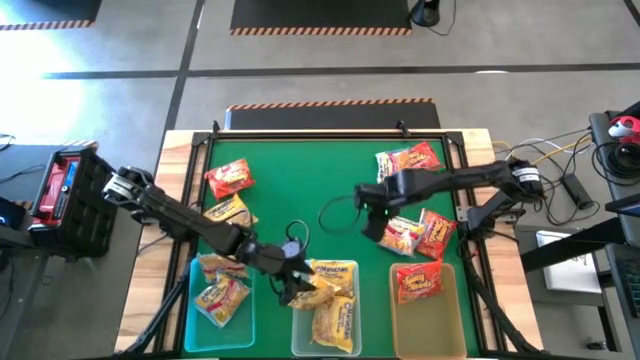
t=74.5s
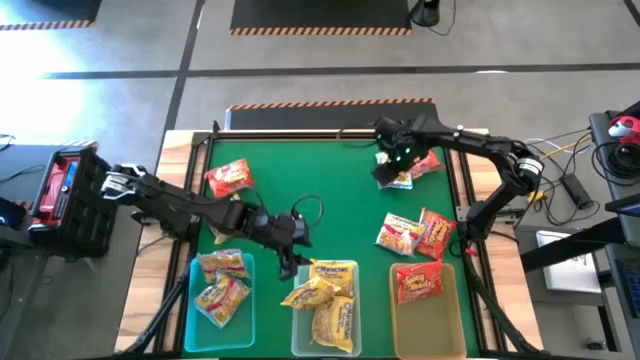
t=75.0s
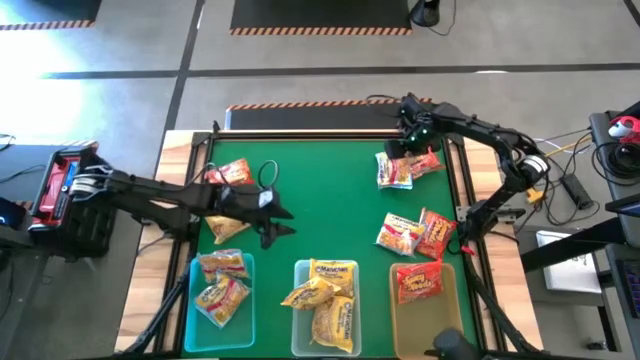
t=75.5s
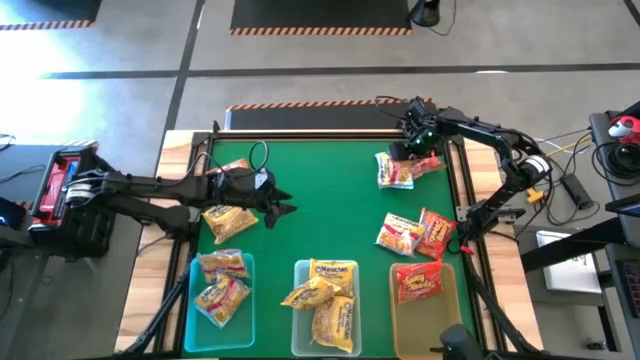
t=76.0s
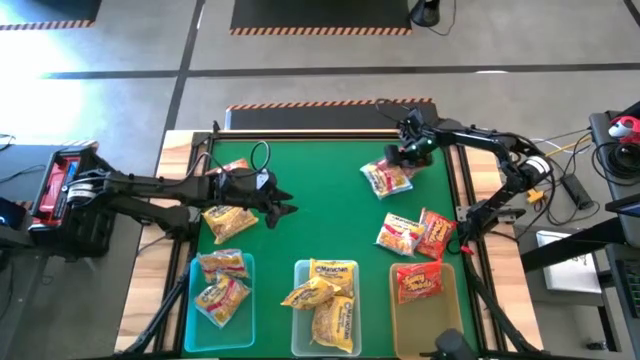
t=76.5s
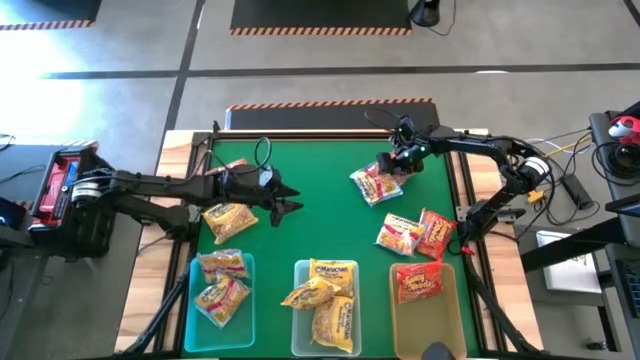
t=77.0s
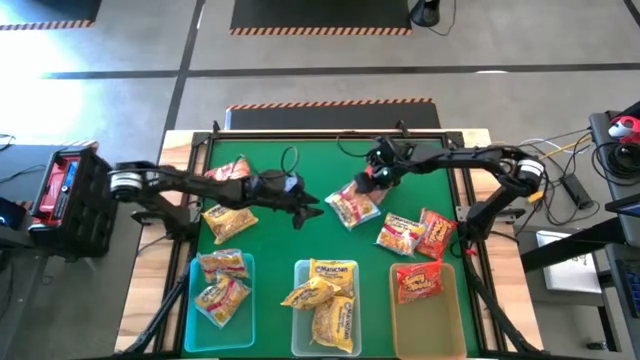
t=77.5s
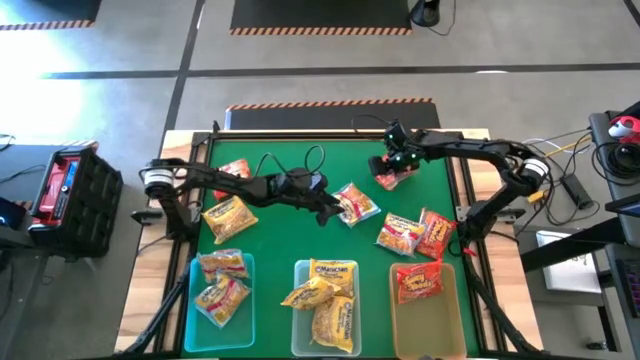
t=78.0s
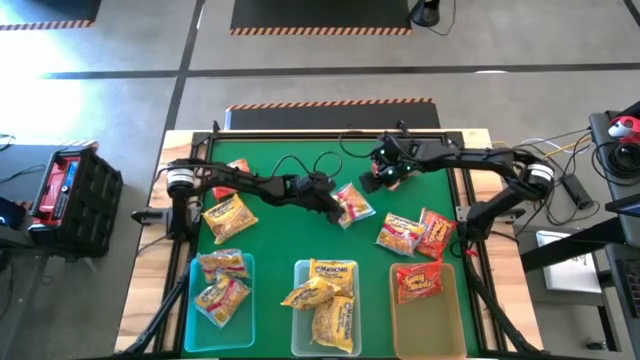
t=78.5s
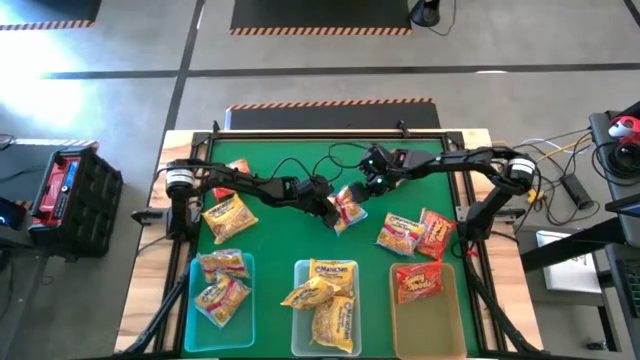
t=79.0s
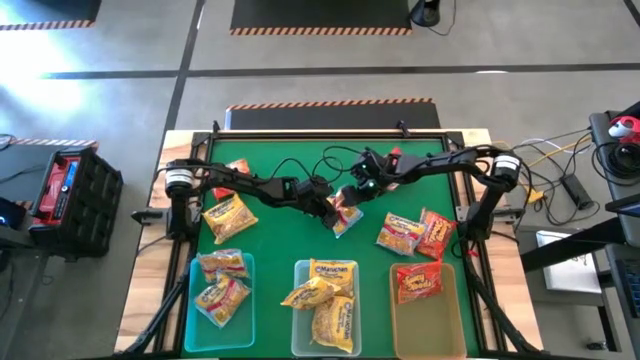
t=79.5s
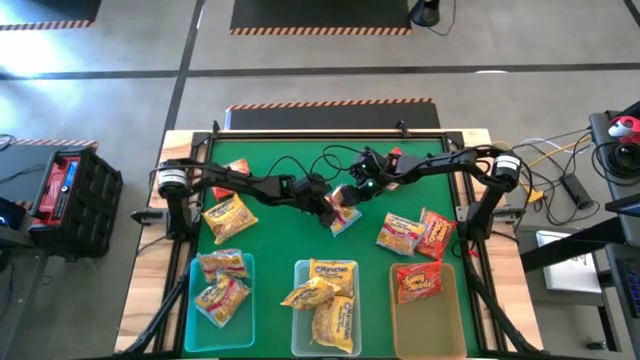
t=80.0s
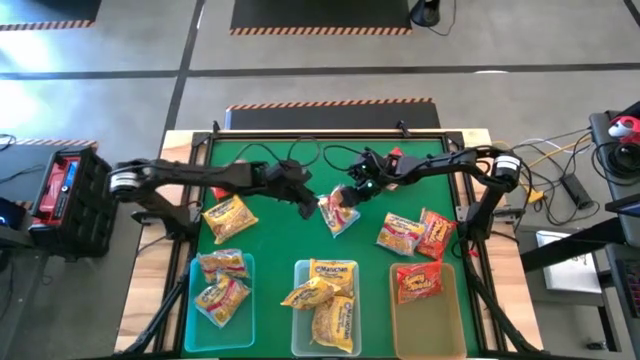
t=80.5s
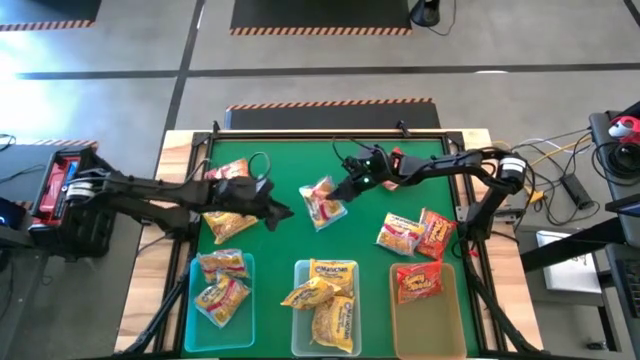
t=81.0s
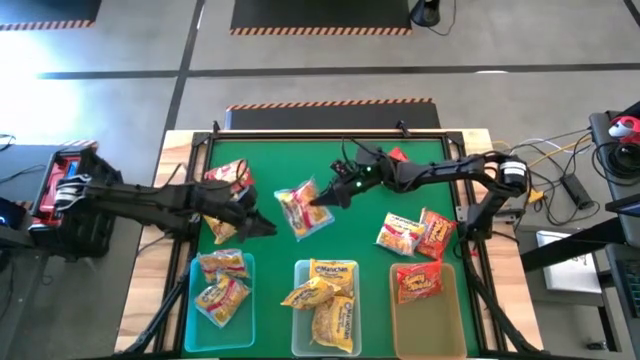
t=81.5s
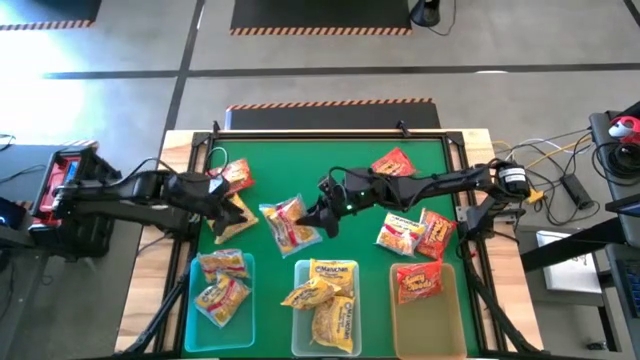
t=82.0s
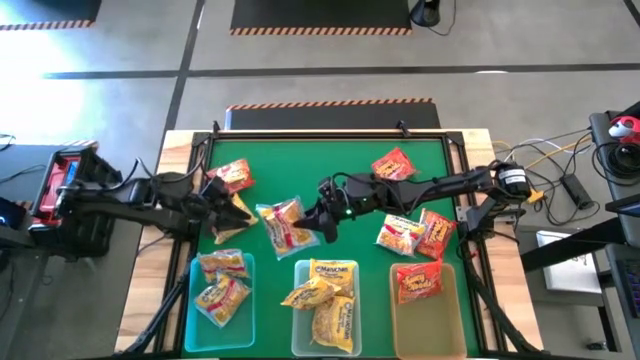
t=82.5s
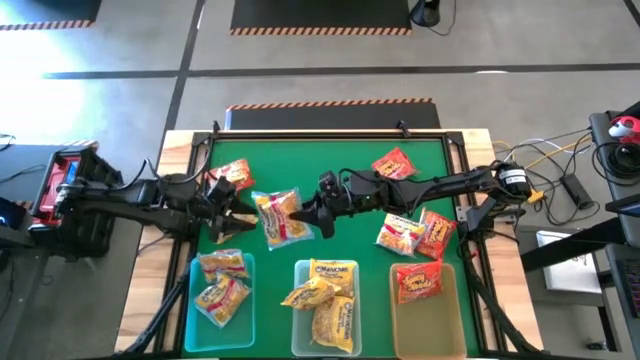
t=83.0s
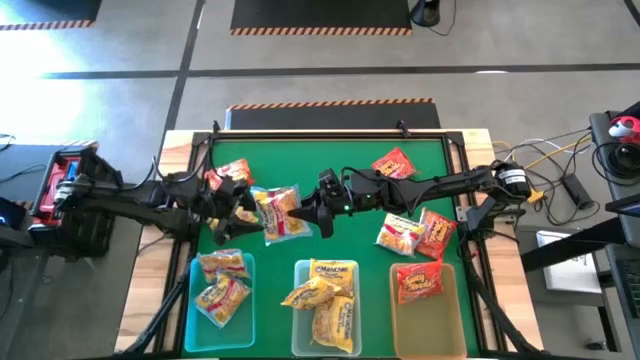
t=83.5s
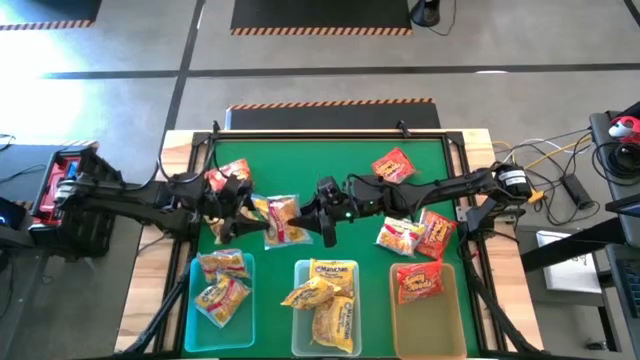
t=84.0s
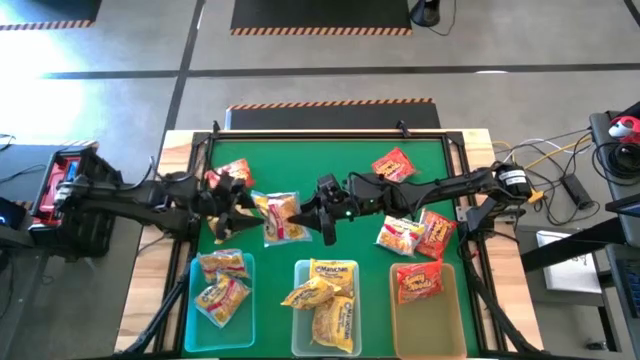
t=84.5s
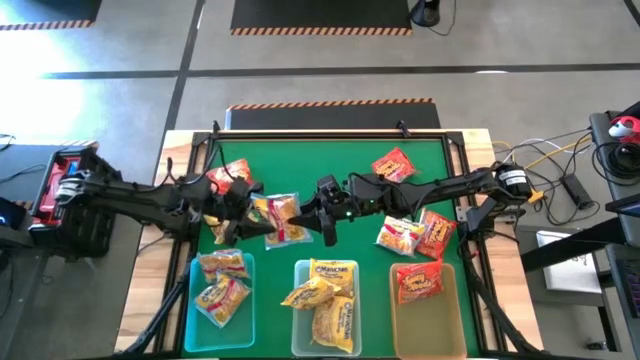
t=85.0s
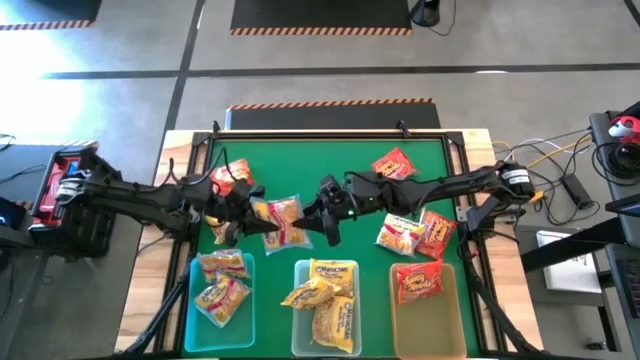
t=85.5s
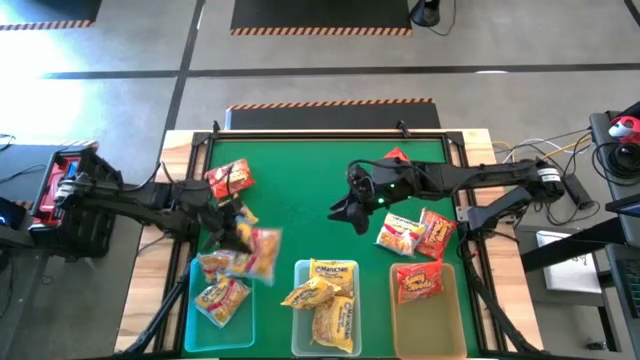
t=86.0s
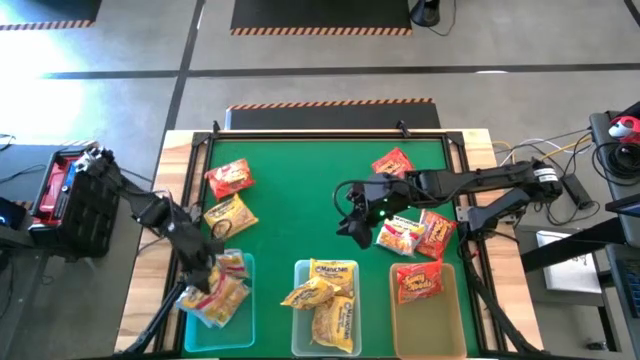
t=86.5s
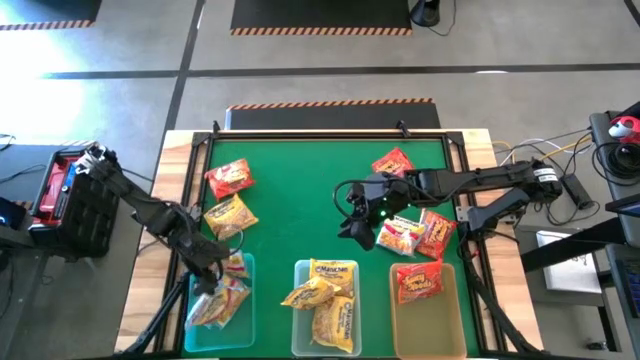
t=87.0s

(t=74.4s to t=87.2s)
Task: Sort Maruchan noodles
Put the blue noodle pack into the blue bin

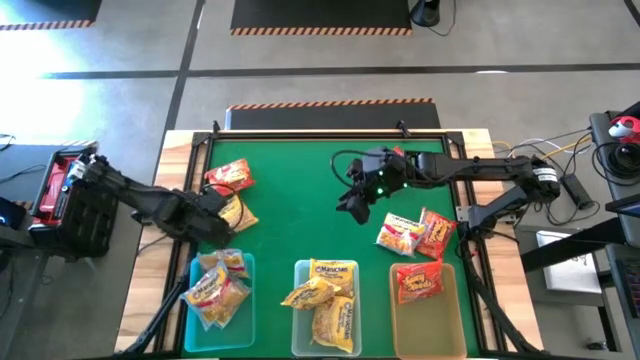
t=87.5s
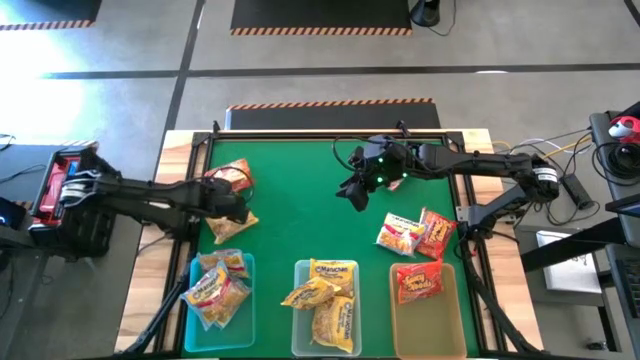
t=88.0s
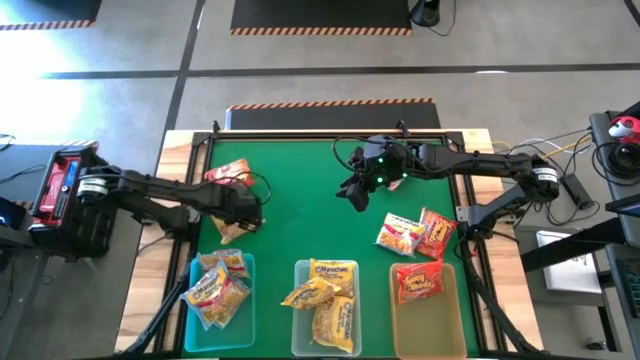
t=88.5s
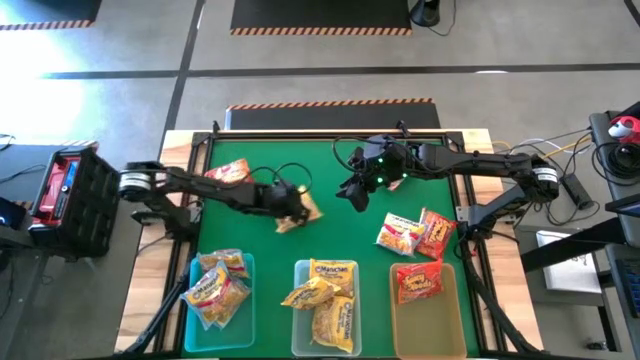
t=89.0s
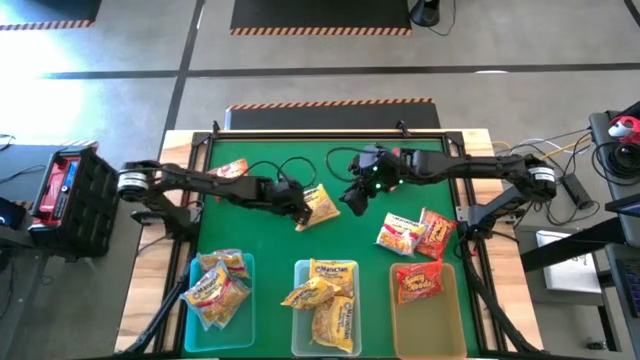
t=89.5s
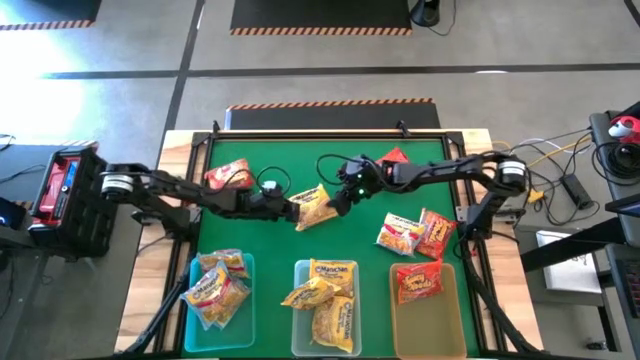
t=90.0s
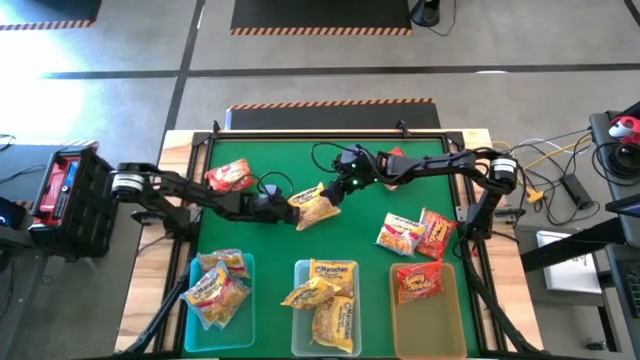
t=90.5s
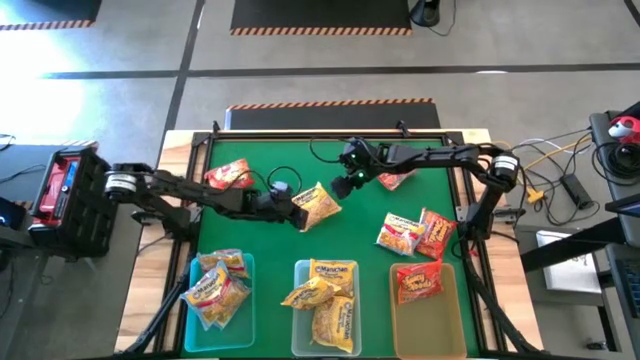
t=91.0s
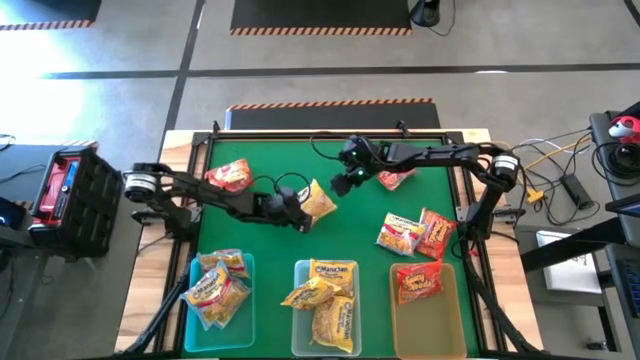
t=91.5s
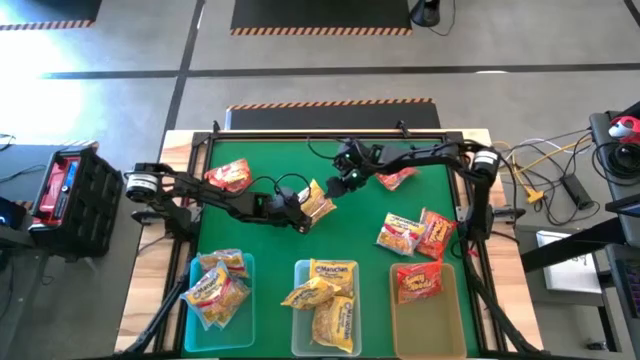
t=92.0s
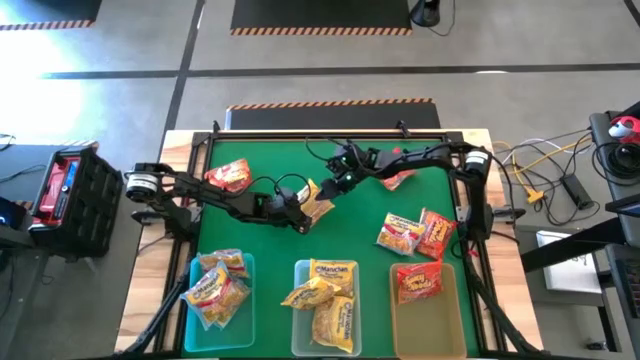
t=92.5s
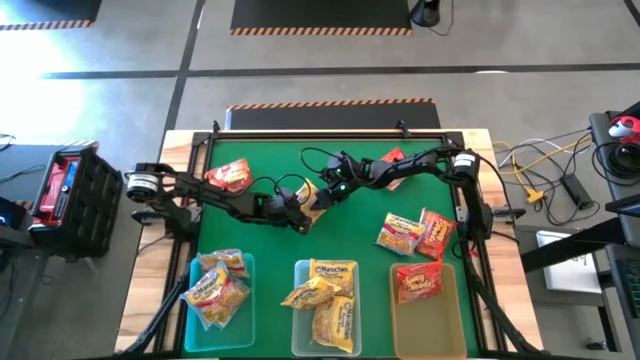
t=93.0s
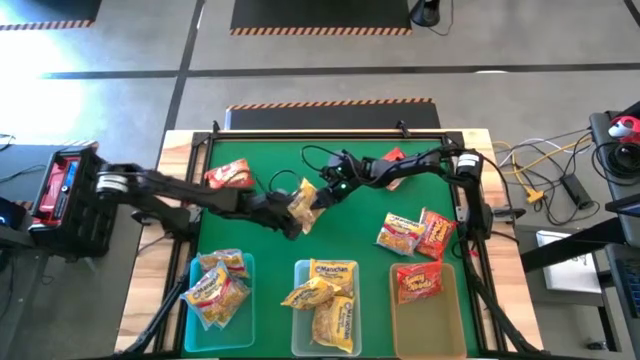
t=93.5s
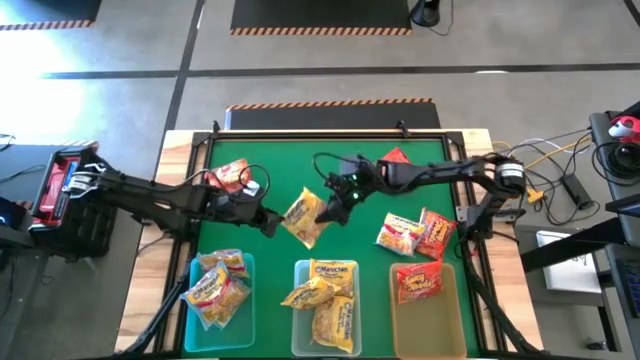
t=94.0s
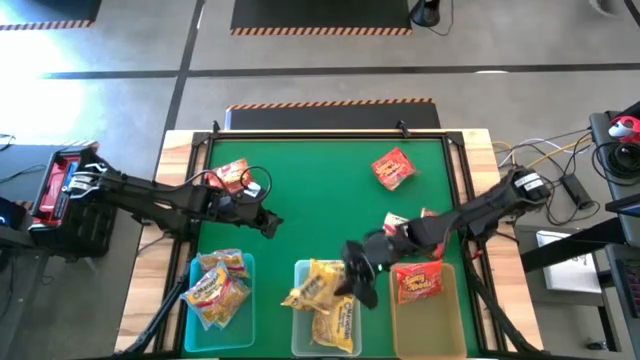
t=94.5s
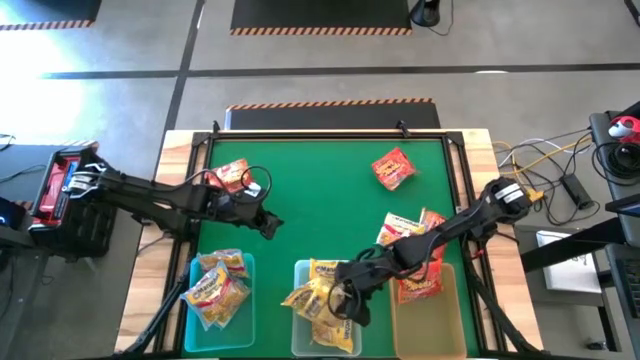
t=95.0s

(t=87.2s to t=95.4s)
Put the yellow noodle pack into the transparent bin
